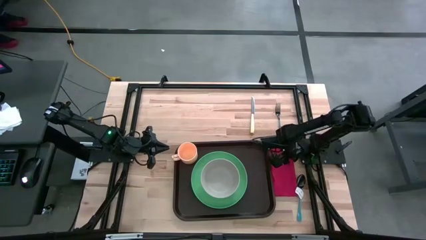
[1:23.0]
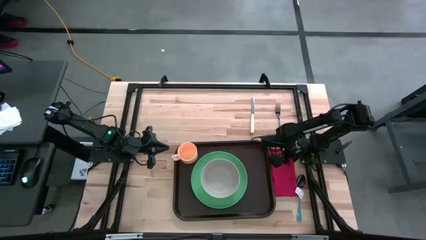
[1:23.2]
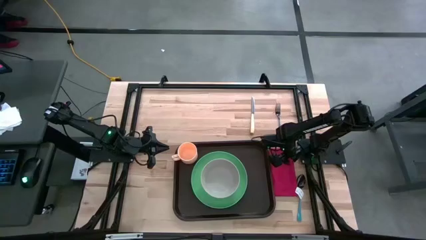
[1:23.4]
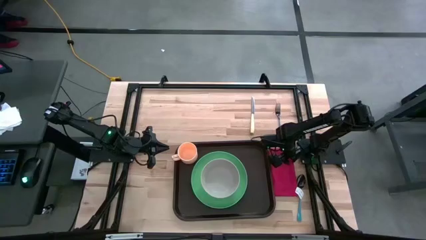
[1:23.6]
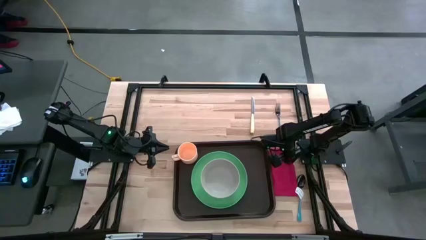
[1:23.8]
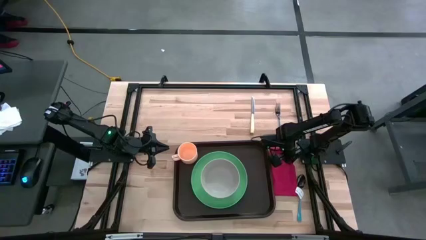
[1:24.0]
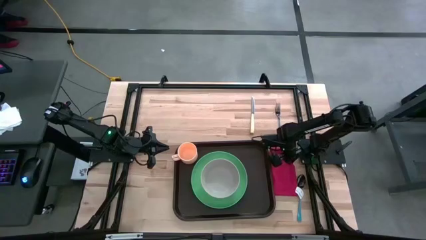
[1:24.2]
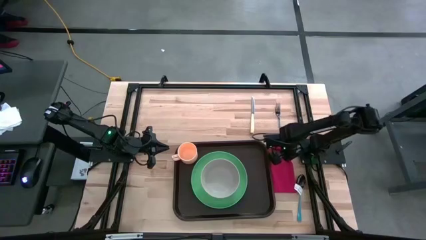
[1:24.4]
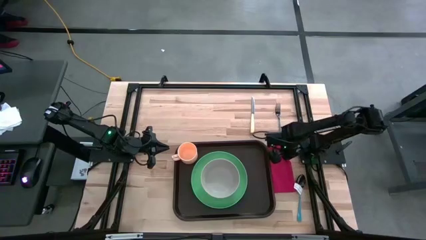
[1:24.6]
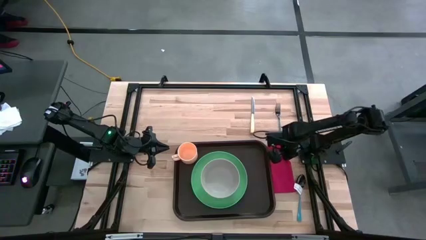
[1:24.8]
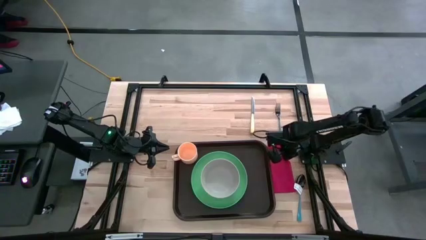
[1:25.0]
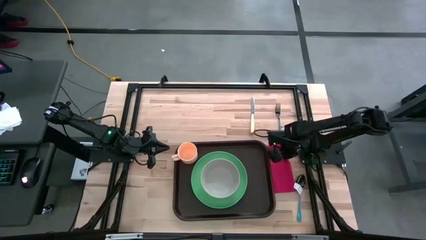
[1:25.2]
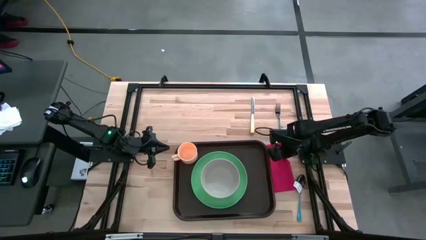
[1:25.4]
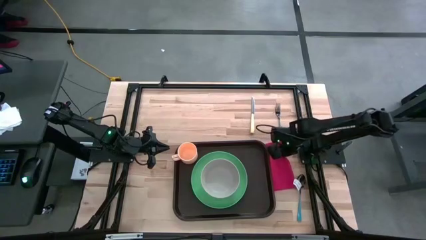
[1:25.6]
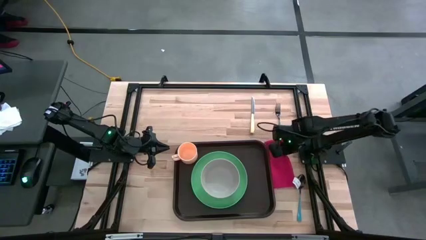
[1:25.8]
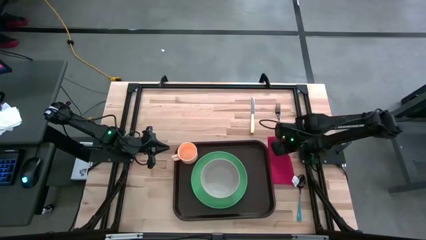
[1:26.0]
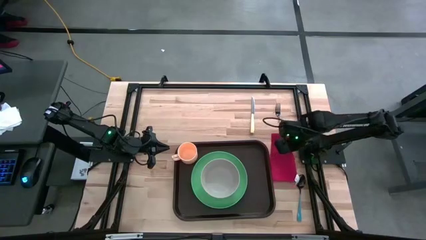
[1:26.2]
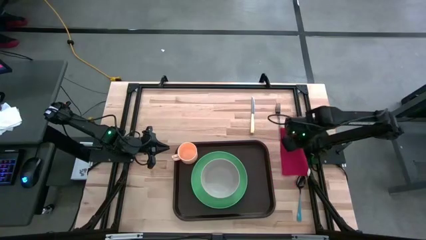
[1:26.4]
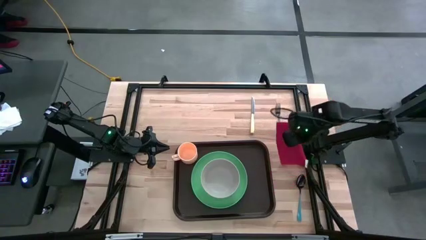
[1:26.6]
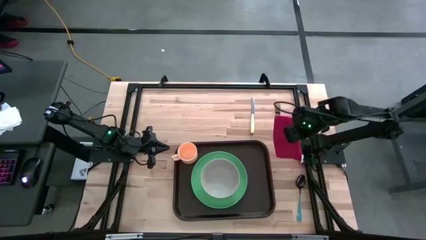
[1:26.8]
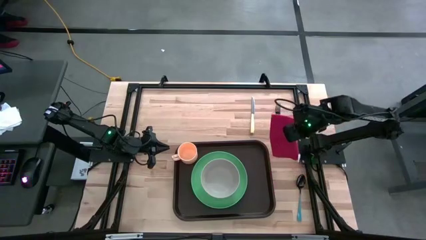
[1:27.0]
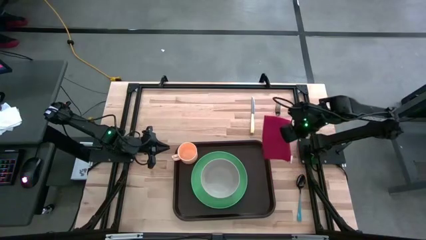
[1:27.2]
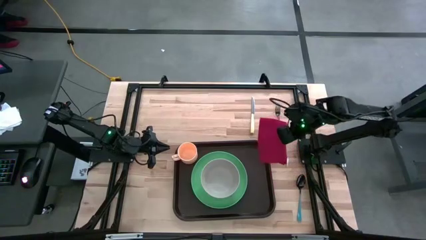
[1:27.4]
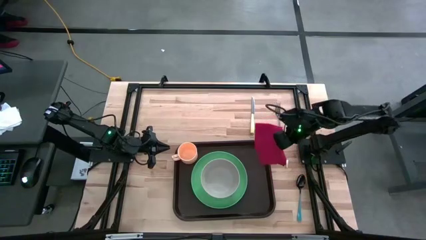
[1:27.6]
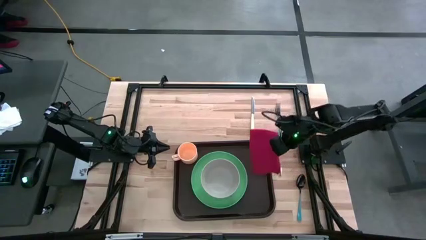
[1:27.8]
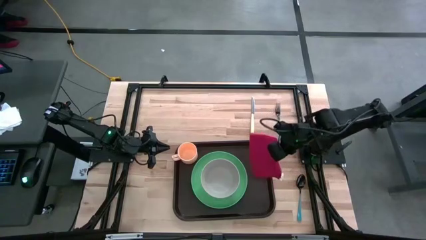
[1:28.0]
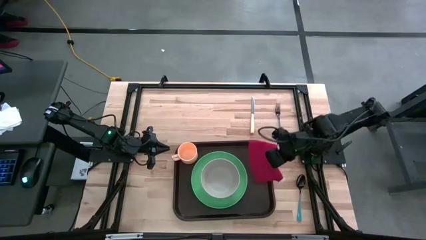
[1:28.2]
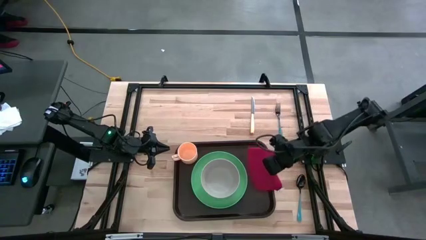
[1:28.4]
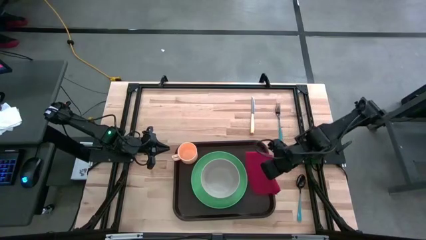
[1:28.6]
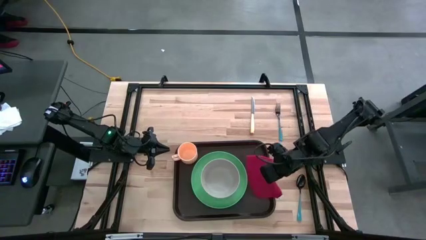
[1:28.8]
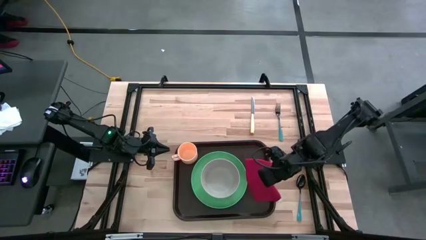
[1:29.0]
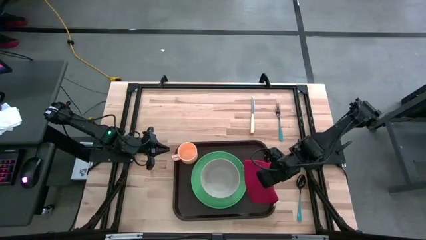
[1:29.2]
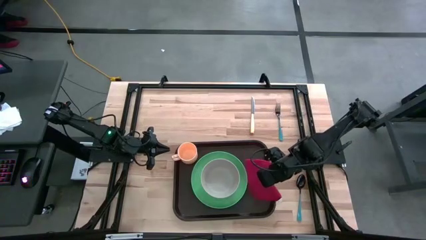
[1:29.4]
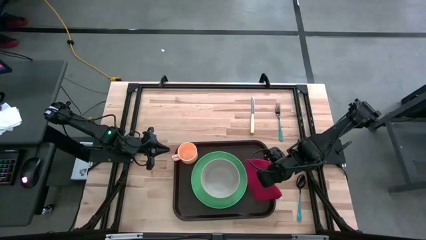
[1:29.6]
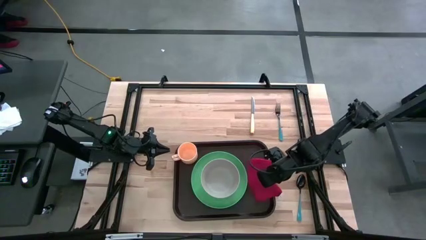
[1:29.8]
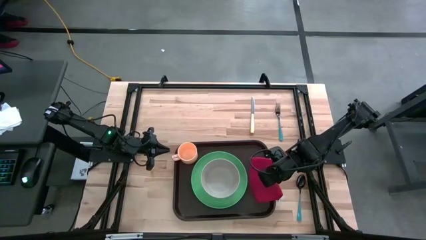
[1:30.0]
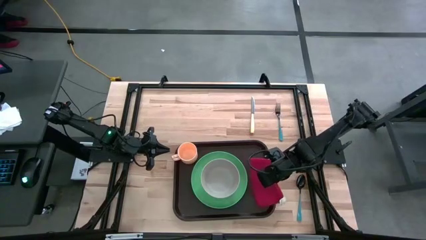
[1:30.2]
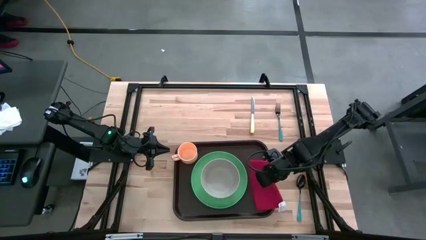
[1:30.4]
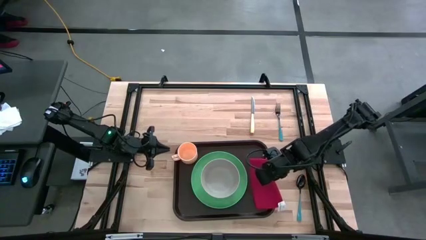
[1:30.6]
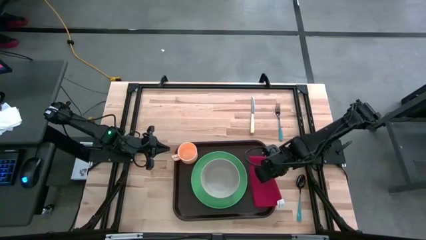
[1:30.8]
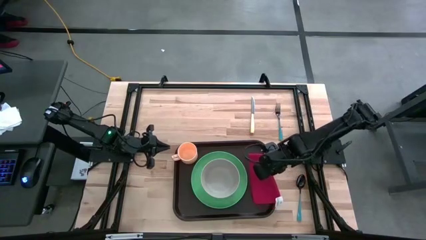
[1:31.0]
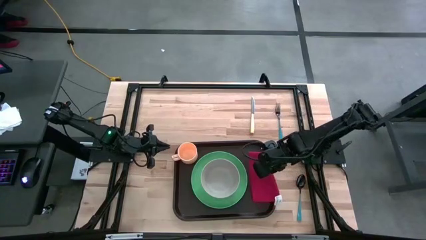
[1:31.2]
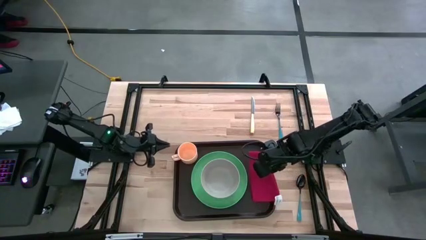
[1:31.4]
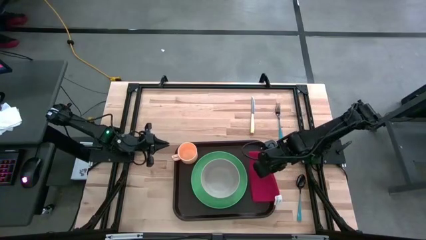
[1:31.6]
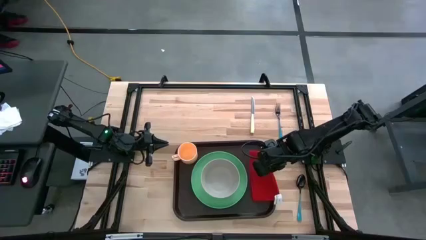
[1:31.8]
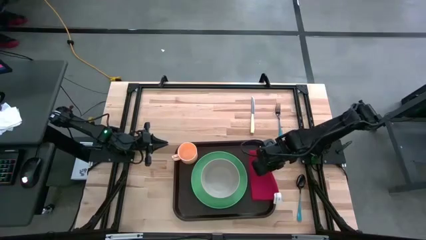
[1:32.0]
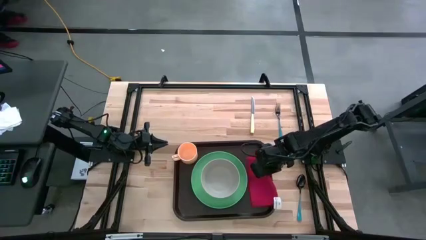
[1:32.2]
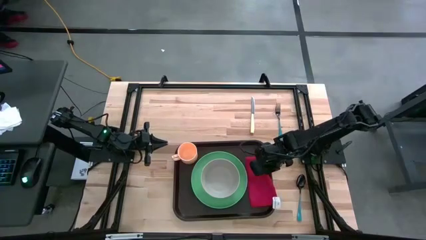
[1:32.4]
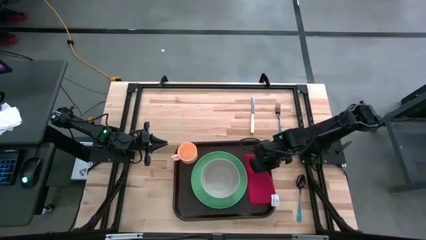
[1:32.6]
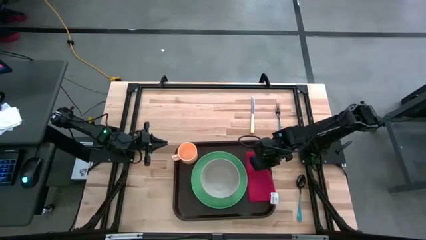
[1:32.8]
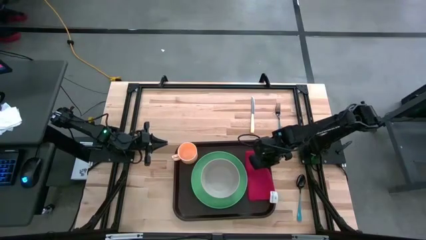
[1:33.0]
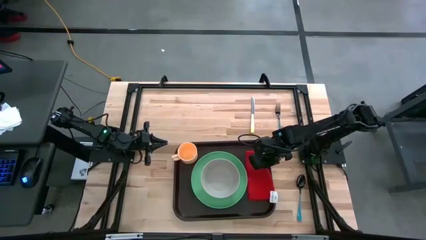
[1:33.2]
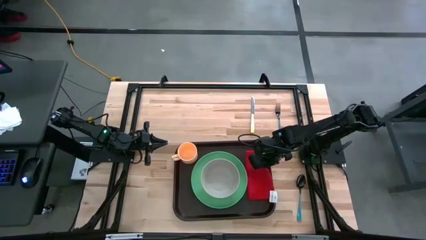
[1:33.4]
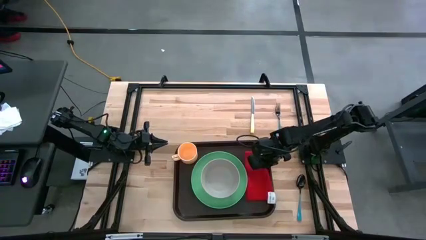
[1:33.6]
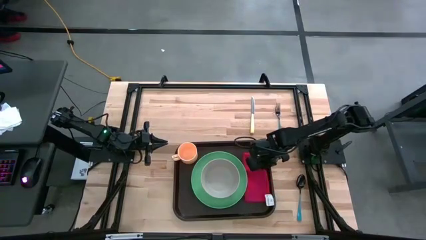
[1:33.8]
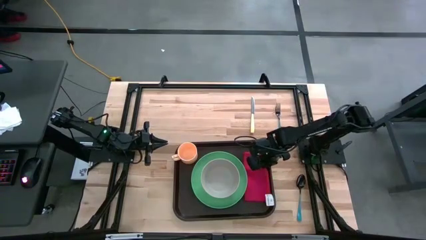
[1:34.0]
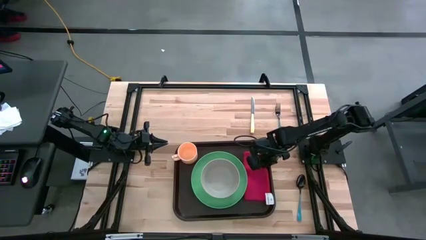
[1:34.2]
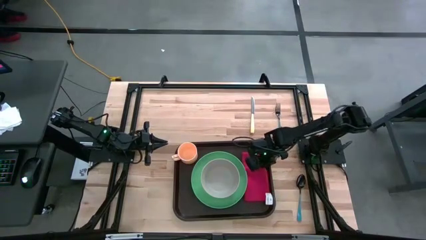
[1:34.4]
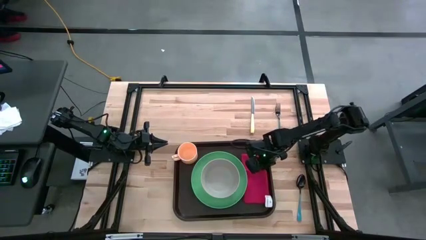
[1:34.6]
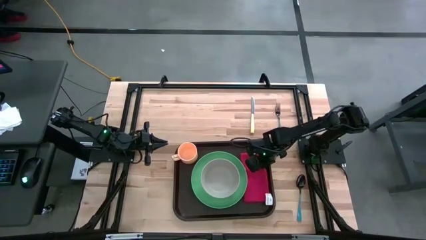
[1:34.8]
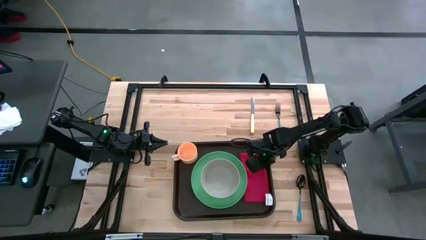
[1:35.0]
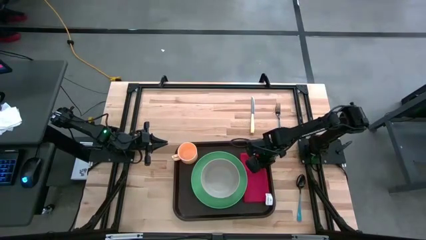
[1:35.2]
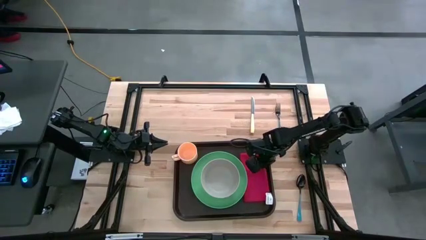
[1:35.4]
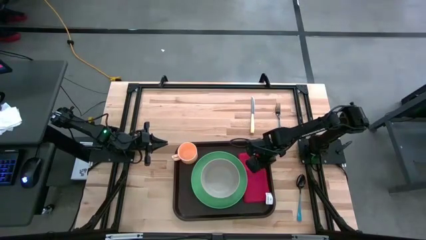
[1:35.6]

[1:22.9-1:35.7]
Task: Set up tray
Put the red napkin beside the green plate on the tray
